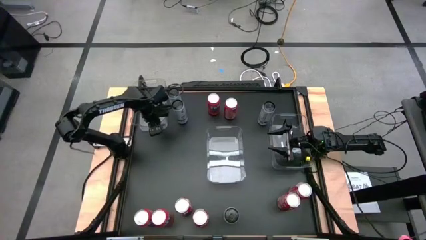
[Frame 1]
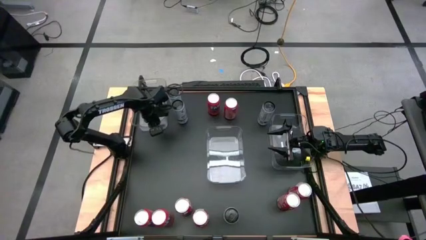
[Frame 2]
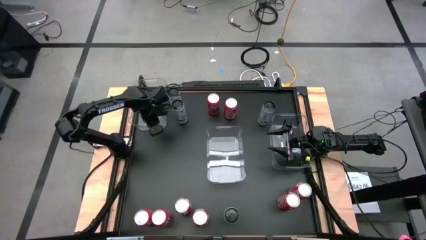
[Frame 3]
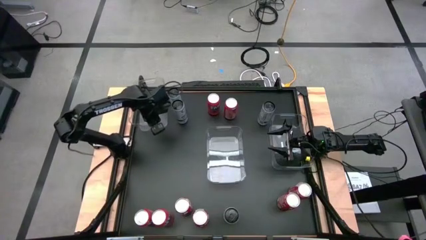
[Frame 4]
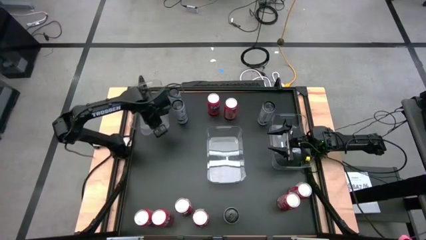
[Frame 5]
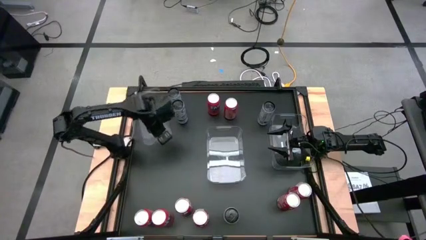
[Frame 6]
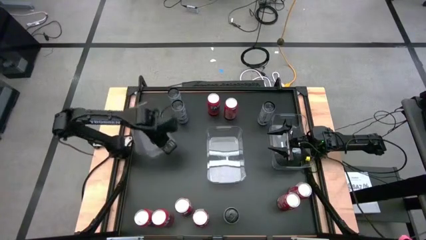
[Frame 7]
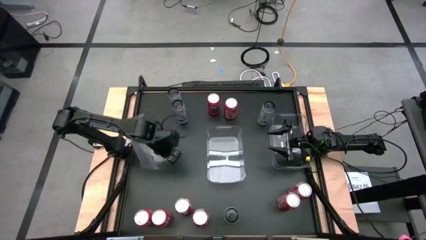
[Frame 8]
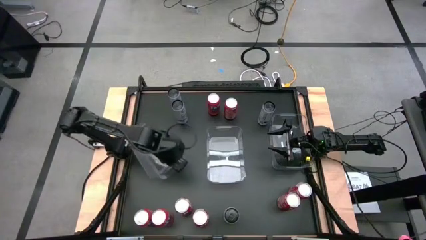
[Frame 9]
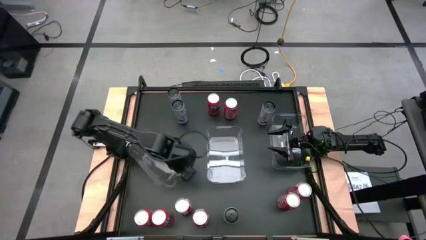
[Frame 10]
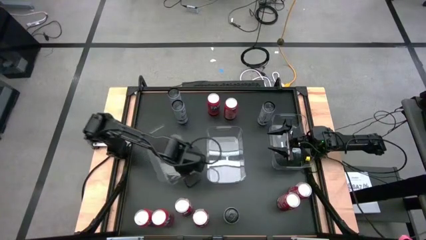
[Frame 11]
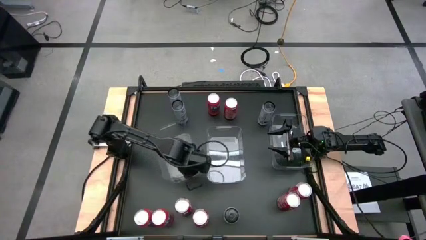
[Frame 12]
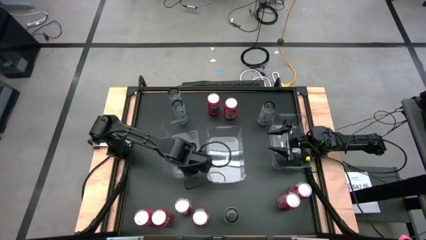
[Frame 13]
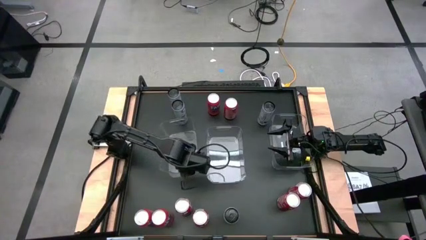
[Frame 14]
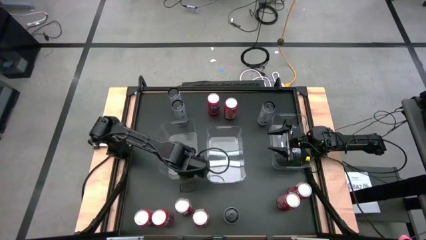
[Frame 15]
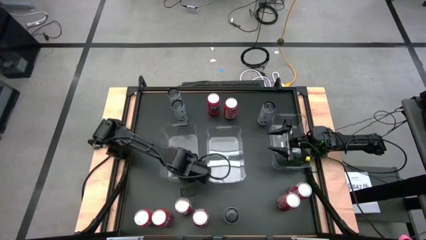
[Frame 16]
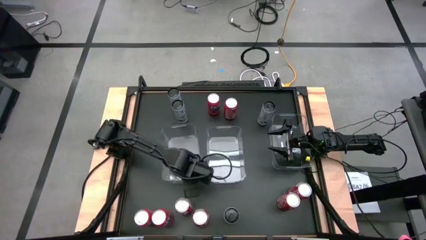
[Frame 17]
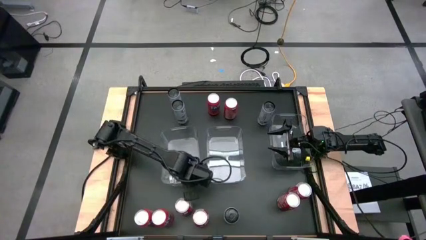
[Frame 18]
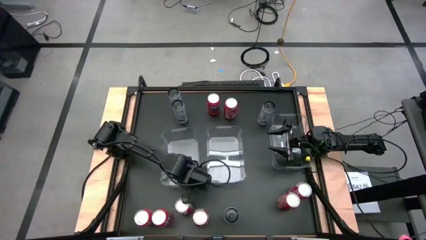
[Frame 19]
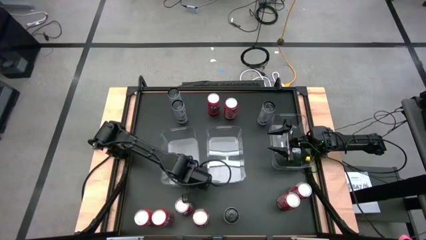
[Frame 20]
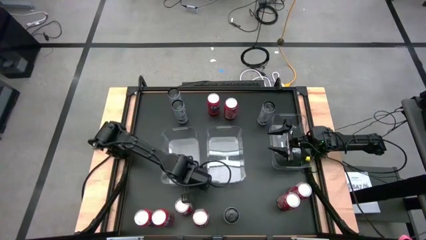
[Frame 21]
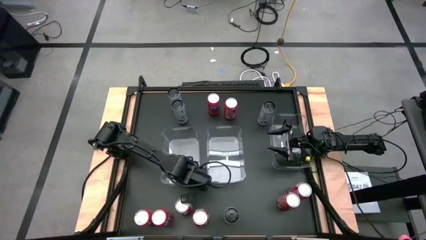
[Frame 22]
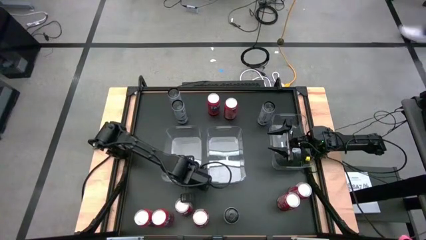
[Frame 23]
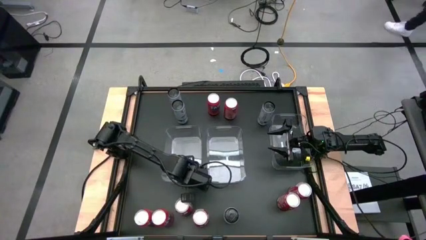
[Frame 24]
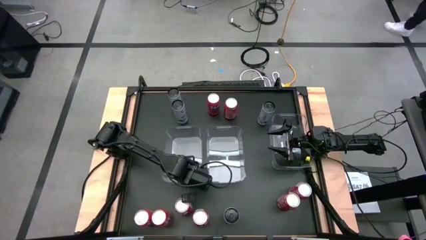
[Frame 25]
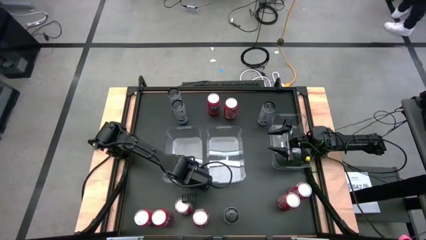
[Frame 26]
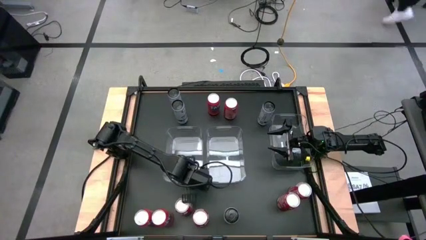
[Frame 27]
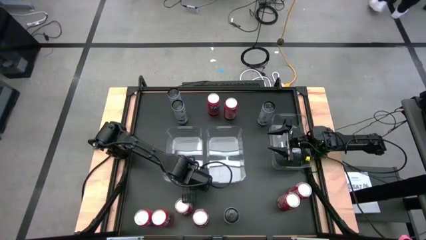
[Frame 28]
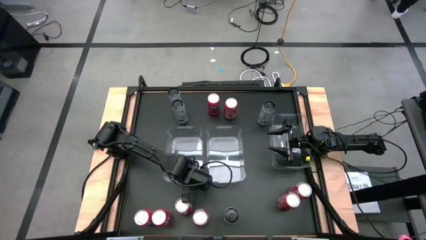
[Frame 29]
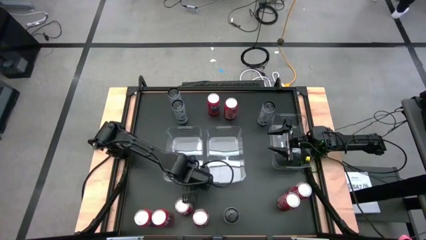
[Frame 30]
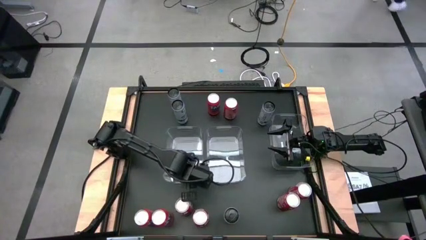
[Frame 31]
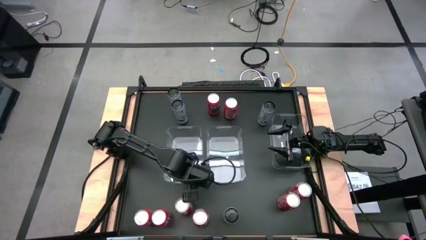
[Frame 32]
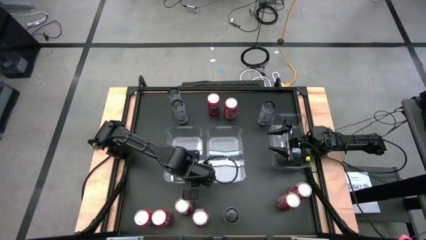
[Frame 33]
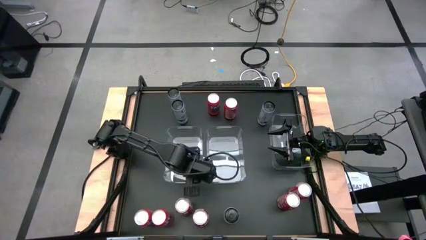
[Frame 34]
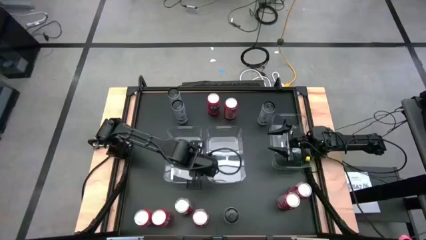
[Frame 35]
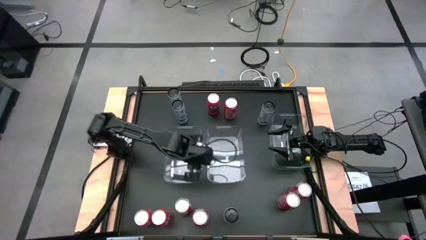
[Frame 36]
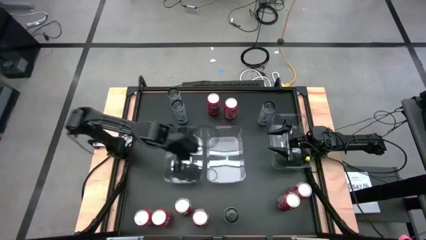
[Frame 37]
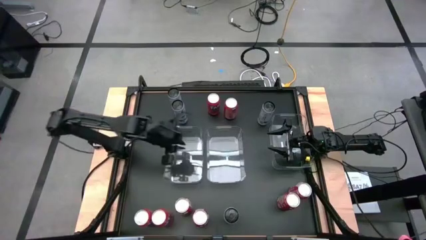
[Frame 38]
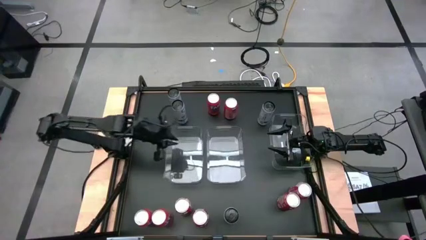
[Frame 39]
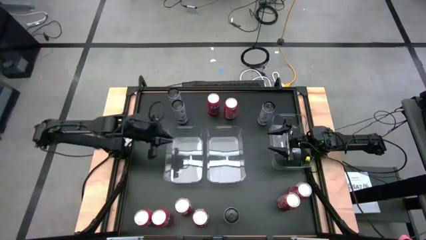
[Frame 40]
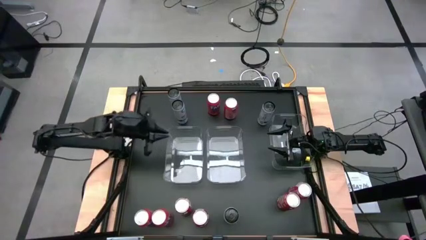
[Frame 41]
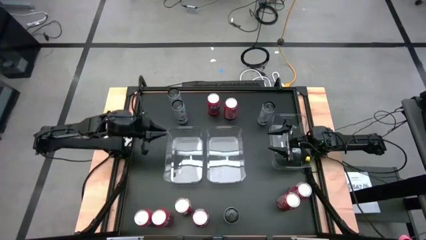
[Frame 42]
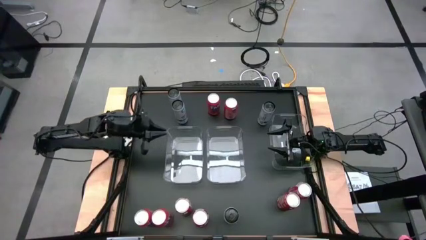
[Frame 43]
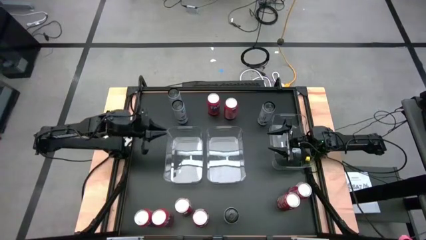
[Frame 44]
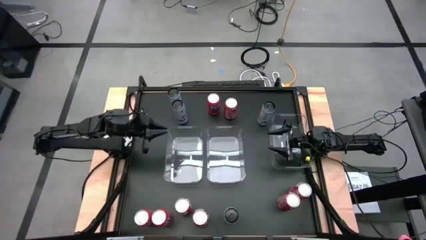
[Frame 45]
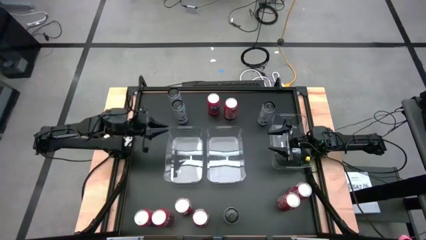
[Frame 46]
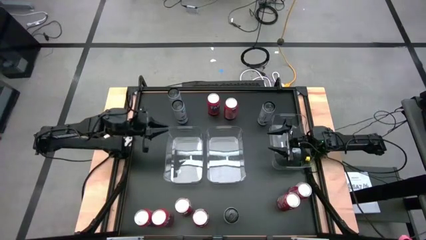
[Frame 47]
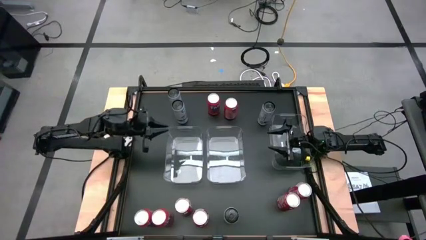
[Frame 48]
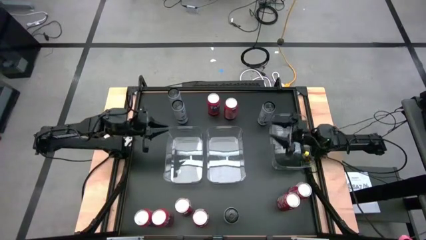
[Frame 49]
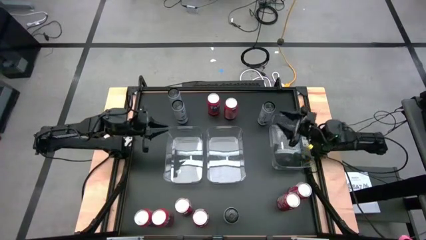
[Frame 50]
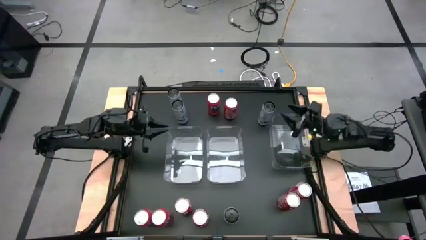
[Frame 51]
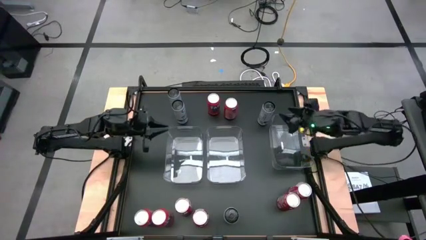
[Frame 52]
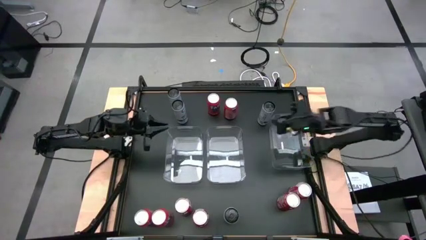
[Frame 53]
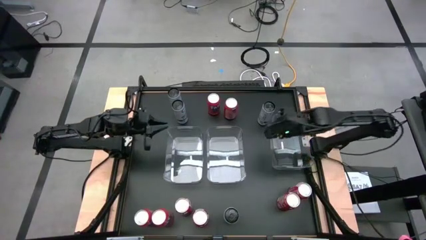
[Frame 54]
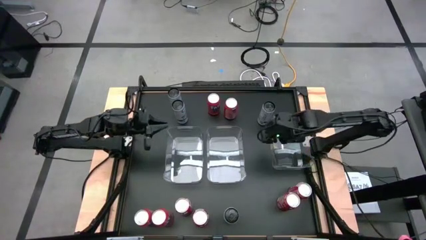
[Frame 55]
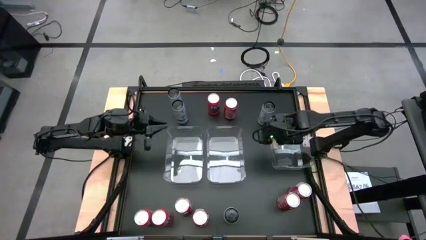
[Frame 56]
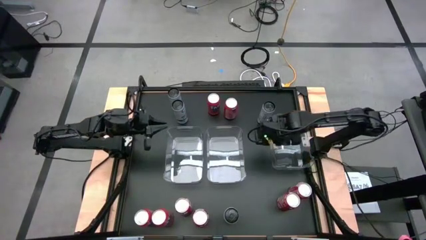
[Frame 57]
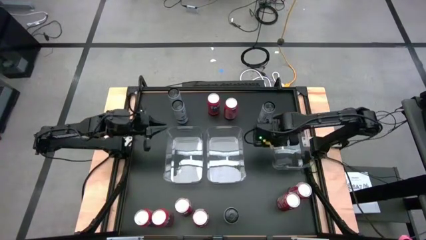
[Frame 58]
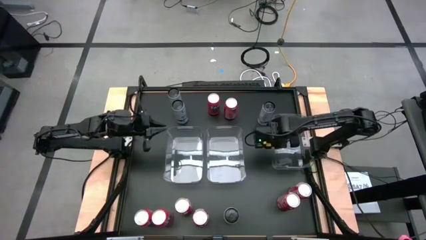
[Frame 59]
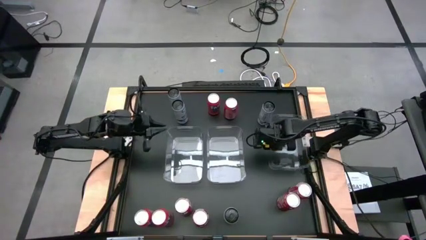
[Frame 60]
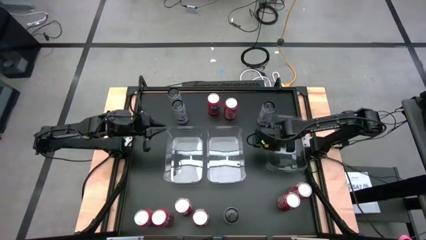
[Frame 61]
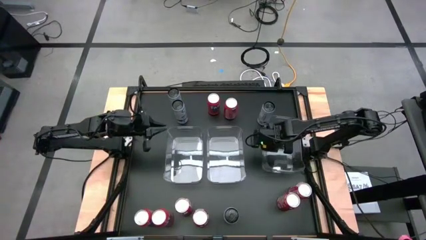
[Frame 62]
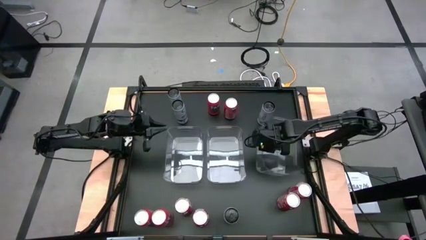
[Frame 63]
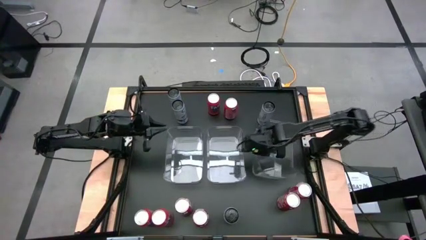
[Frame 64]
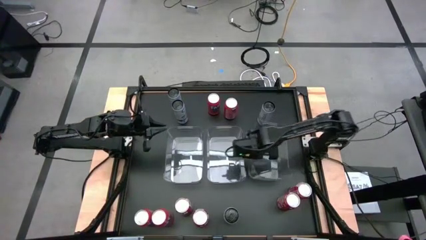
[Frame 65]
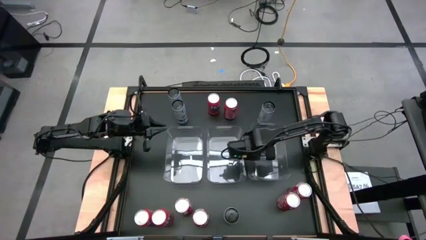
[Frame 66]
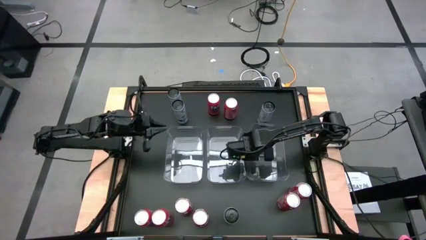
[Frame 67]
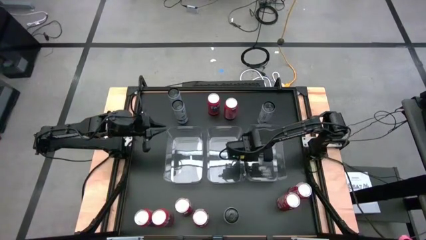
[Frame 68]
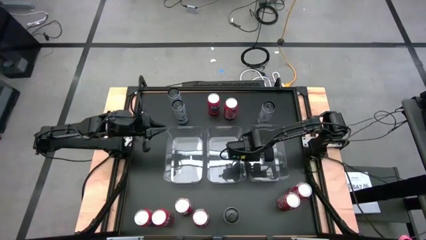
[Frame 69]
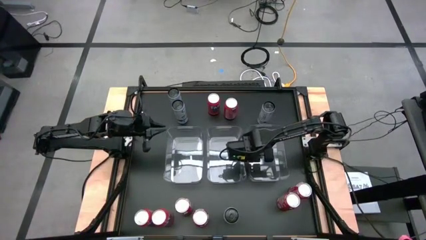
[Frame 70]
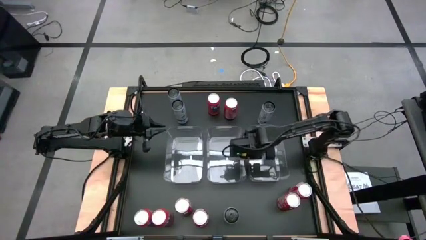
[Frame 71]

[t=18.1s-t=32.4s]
Task: Sort soda cans
Move the transparent bins to the center of the table
